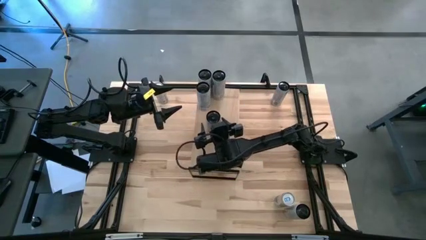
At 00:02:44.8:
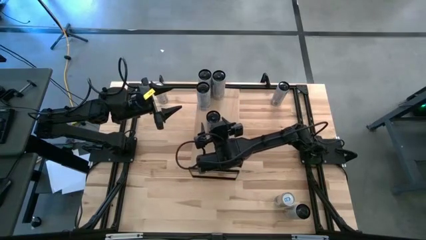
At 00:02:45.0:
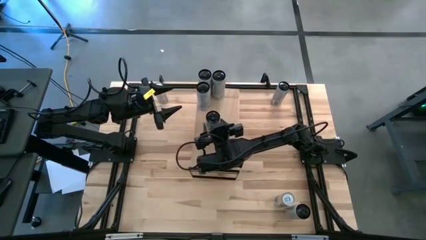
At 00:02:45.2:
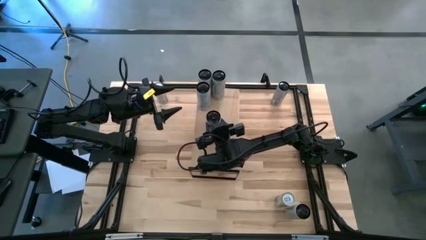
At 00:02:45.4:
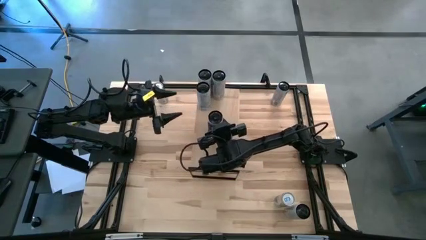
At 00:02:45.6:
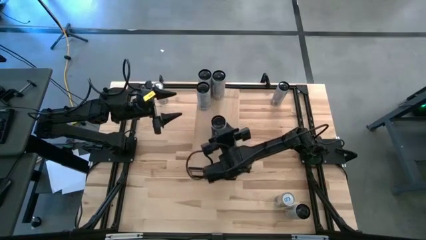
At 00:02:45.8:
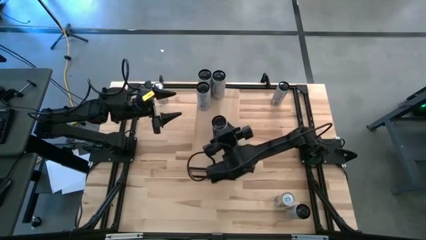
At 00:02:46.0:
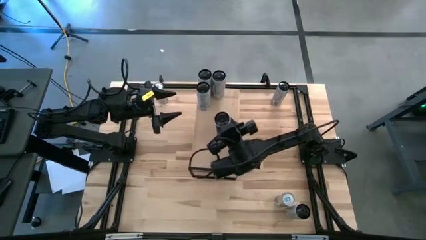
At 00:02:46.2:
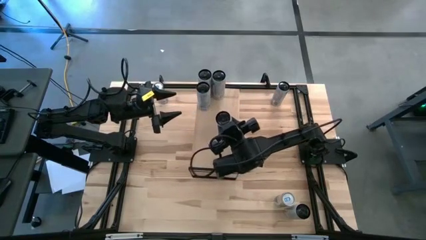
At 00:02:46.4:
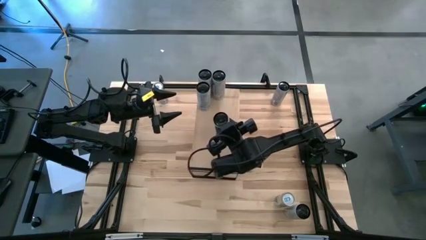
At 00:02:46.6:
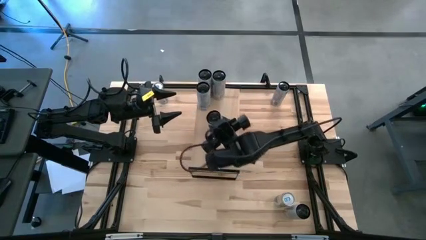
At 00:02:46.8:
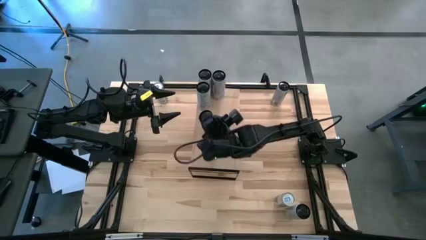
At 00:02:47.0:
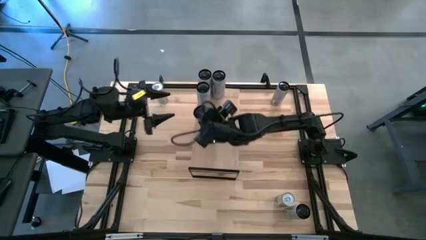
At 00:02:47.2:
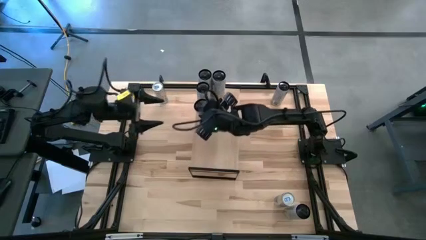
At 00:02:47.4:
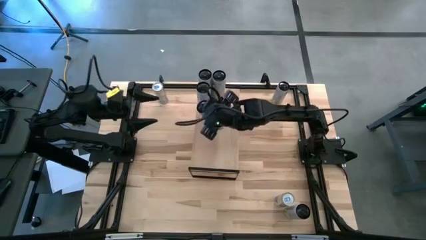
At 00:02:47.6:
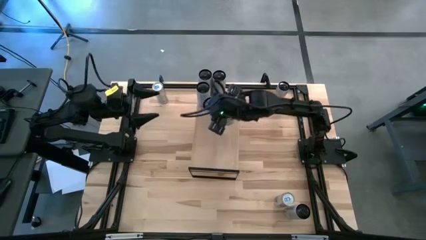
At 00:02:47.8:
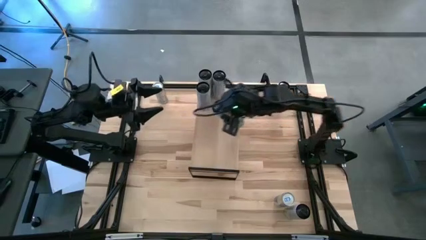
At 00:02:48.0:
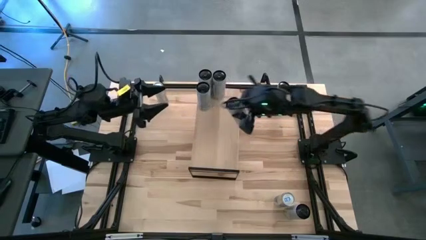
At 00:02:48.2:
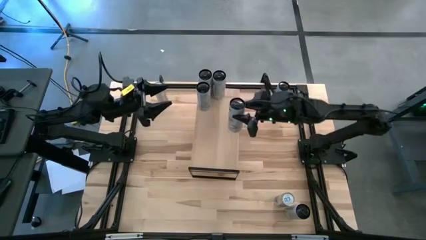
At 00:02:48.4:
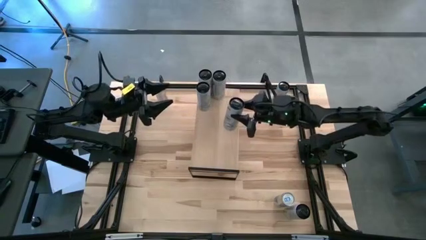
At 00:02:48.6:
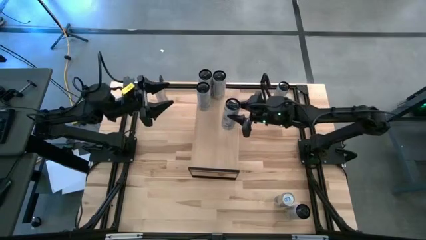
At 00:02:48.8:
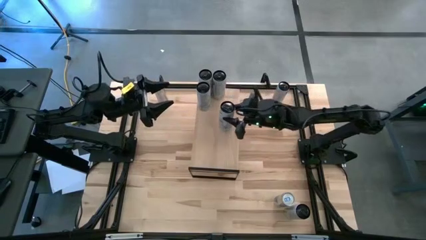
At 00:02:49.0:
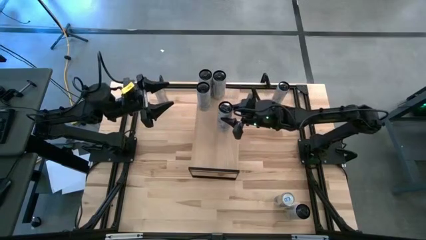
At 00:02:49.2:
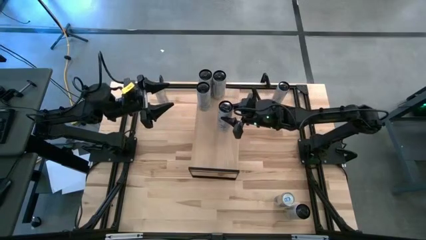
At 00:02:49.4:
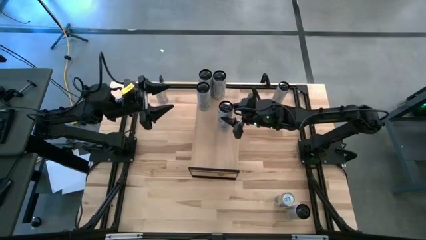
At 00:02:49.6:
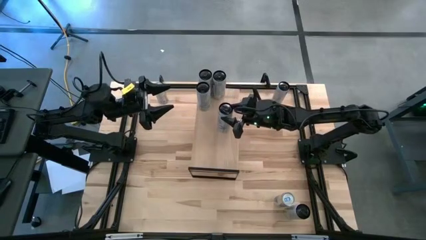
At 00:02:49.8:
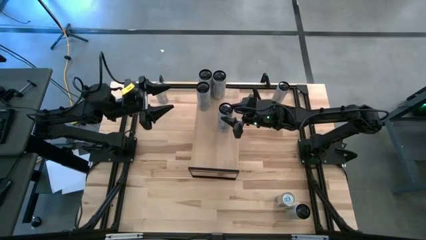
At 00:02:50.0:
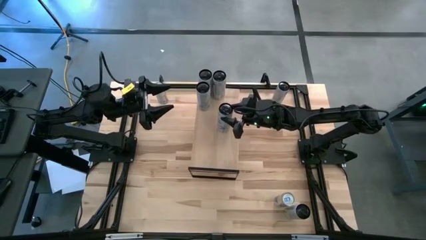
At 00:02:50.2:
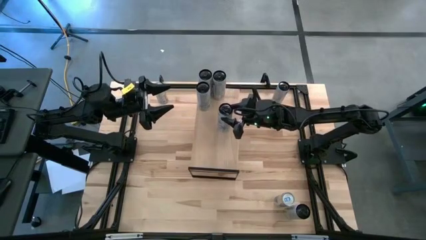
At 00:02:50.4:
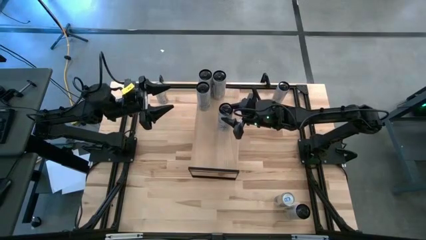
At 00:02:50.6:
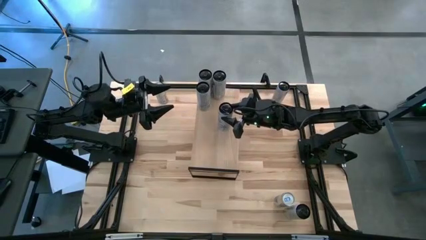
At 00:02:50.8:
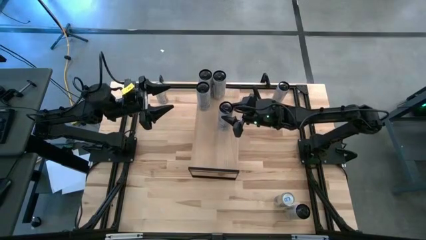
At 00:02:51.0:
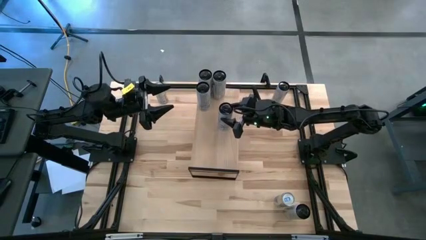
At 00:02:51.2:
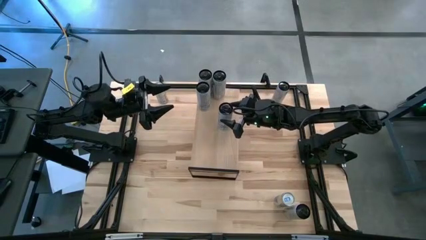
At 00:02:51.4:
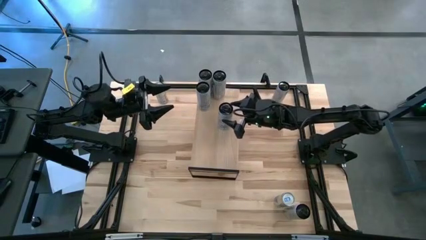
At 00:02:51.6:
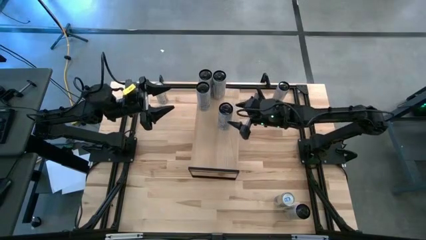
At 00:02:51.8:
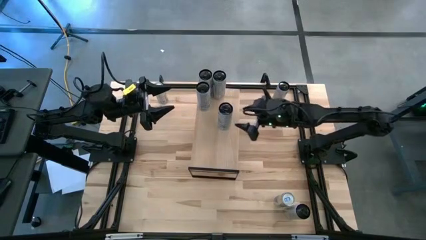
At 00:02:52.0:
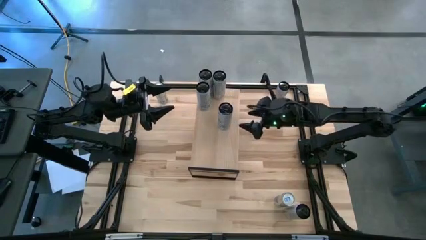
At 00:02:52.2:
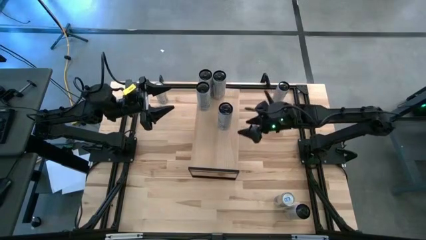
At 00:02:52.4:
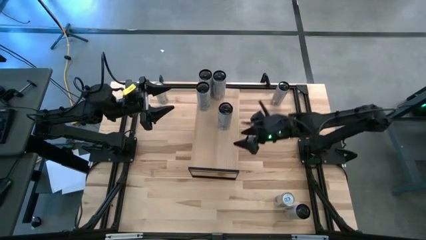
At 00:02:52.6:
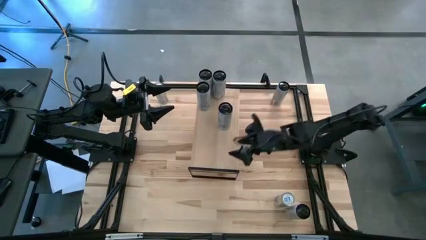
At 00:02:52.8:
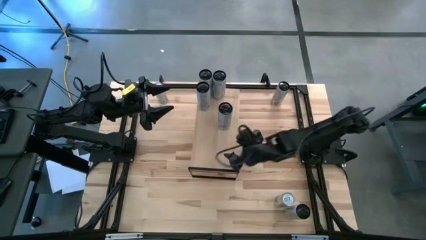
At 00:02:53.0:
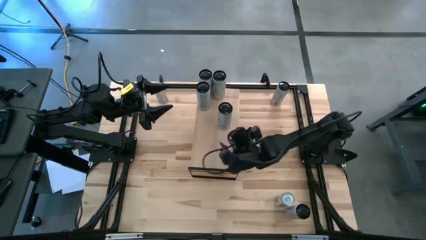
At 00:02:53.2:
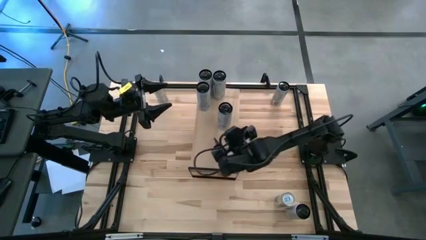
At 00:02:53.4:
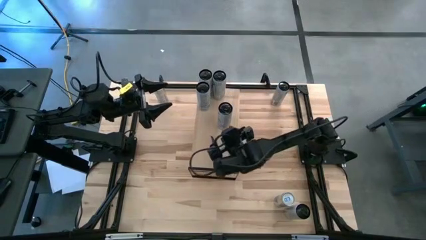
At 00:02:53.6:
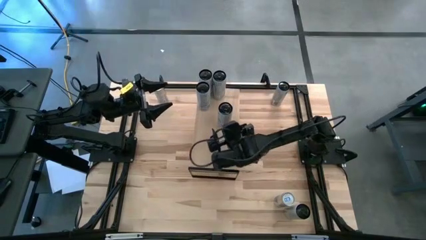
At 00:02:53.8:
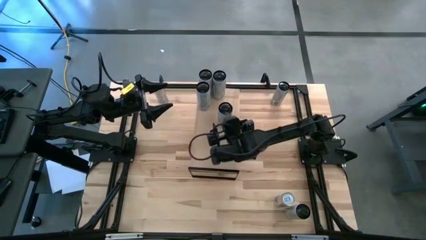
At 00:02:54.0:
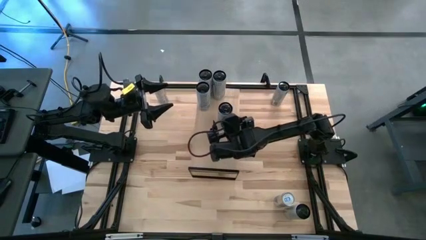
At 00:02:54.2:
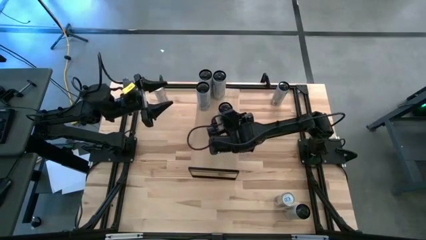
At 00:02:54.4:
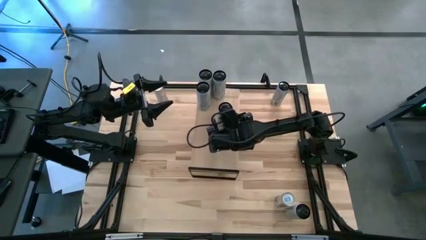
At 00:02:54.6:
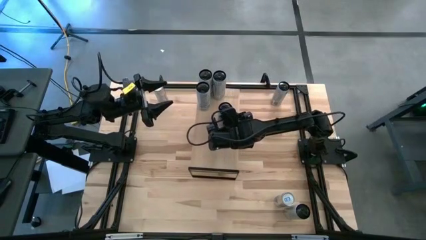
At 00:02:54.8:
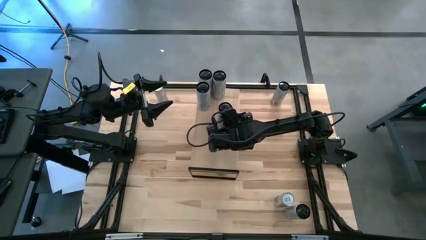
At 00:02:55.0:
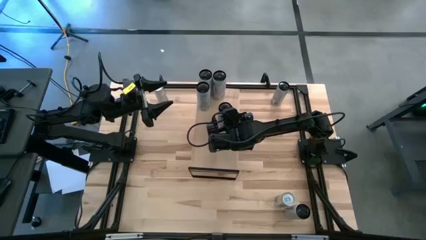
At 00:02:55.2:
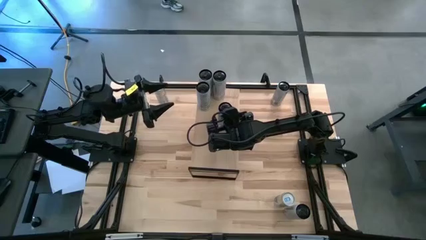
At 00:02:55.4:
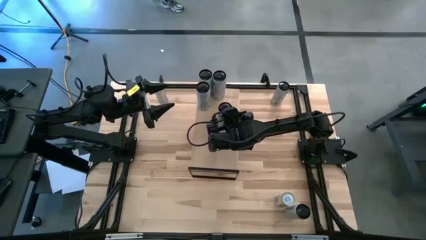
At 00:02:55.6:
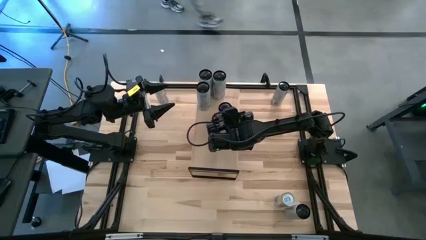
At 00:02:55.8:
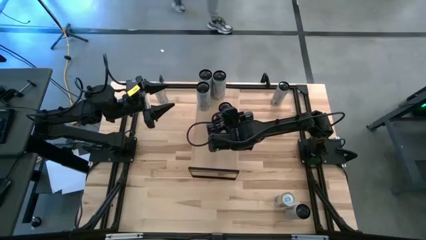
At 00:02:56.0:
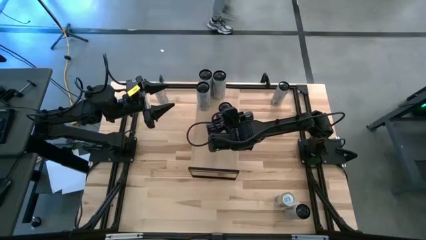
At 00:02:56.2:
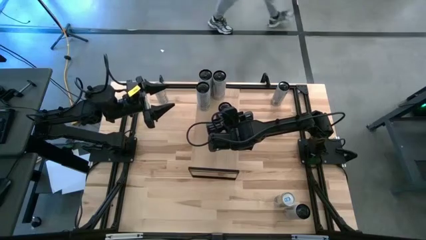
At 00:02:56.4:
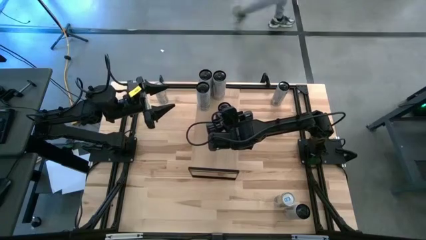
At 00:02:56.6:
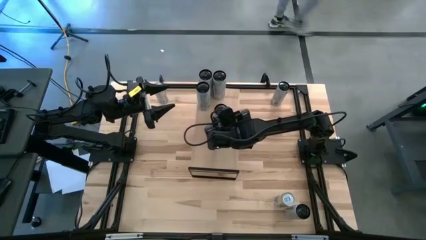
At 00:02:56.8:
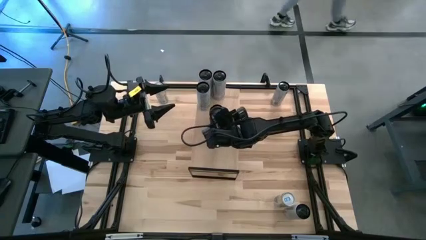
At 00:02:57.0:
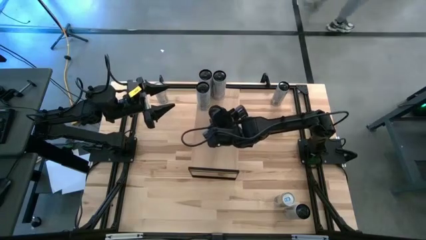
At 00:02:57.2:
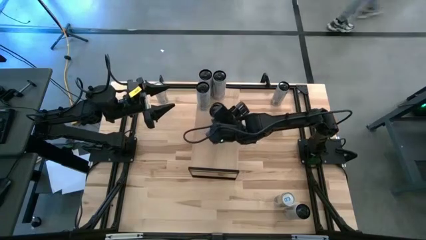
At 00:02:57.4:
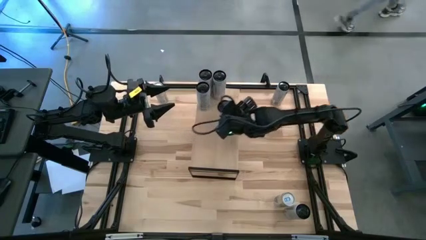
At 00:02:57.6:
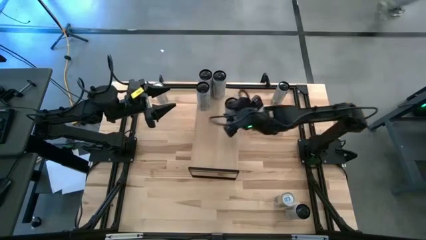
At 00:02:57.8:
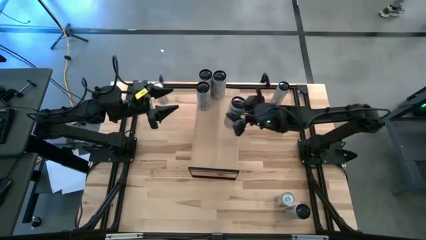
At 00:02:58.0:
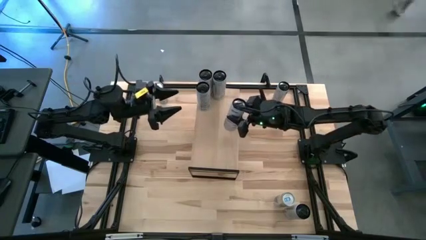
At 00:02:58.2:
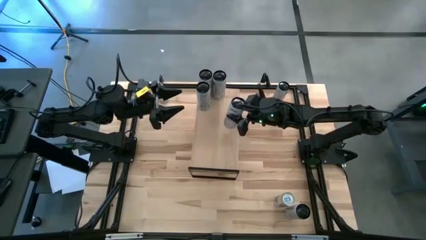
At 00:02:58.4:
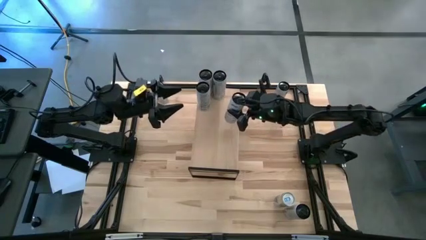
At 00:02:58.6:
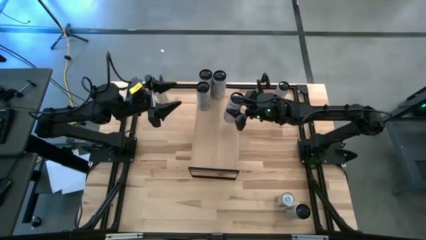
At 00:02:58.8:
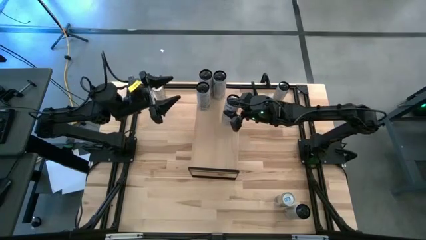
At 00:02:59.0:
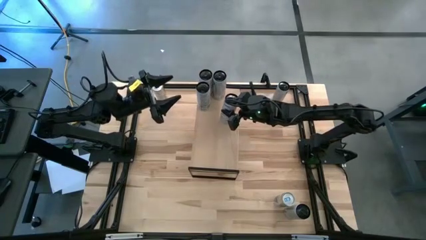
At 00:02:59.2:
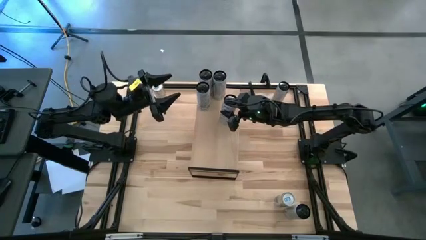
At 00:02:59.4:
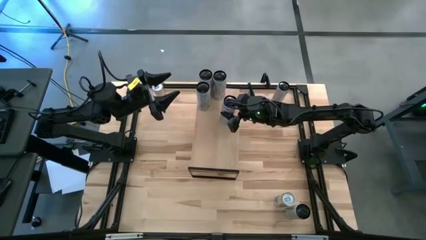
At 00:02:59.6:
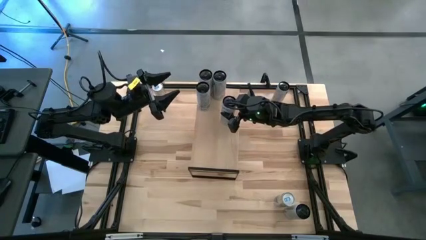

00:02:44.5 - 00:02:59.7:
Task: Place canned beverage on shelf
Put the white blue soda can on the shelf aligned with the white blue soda can
